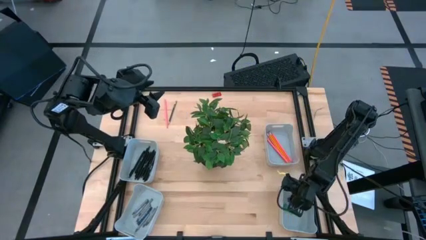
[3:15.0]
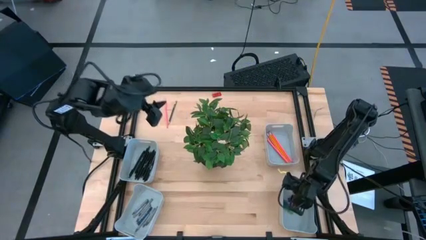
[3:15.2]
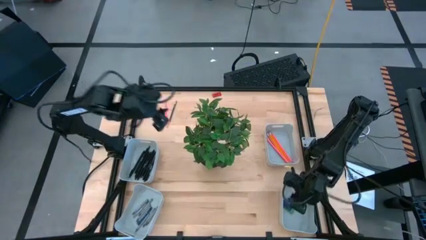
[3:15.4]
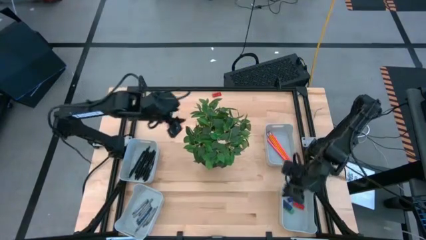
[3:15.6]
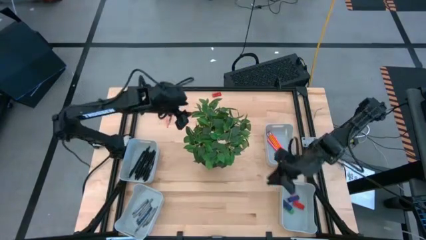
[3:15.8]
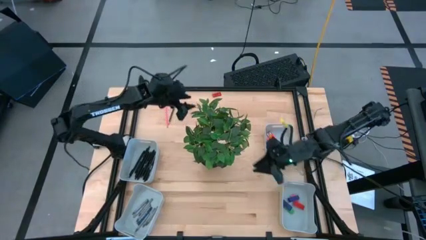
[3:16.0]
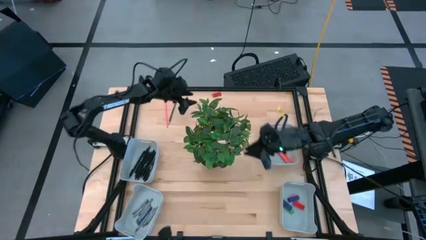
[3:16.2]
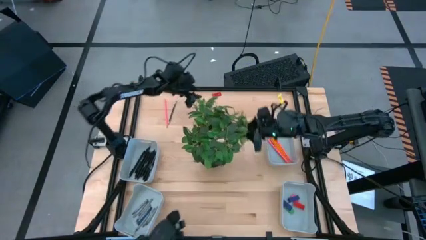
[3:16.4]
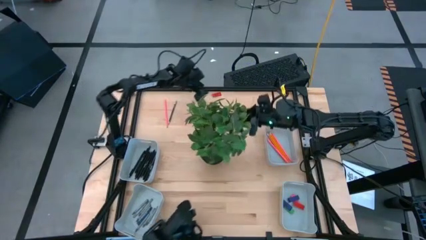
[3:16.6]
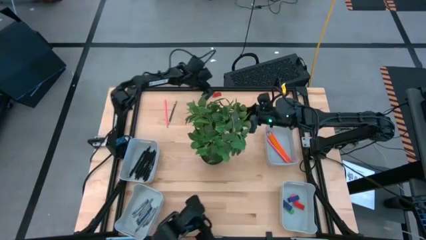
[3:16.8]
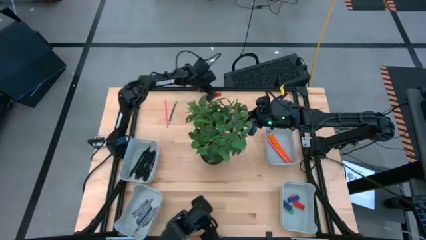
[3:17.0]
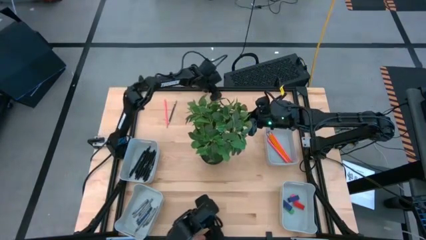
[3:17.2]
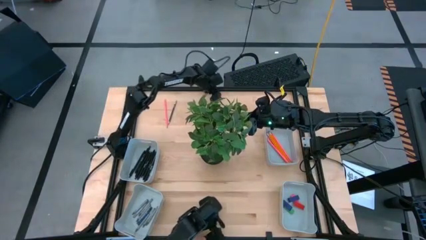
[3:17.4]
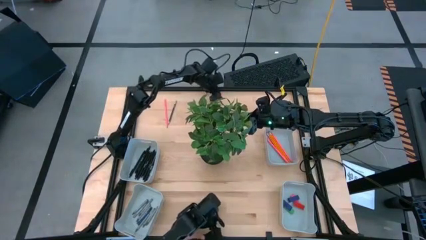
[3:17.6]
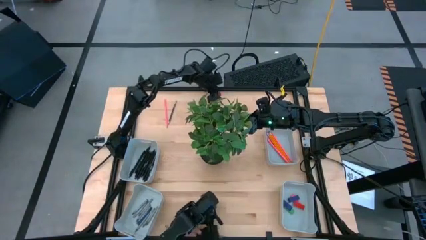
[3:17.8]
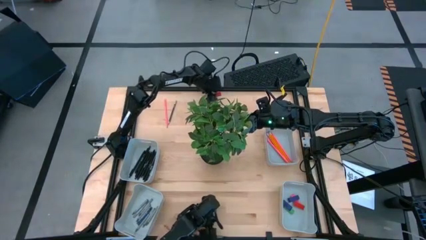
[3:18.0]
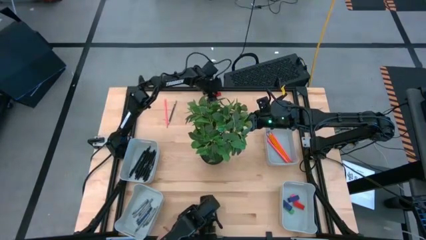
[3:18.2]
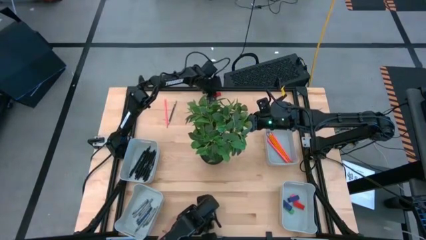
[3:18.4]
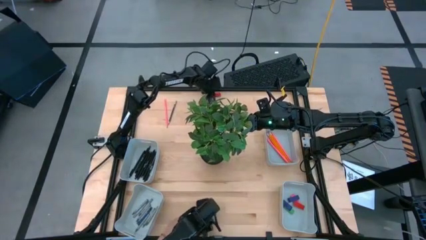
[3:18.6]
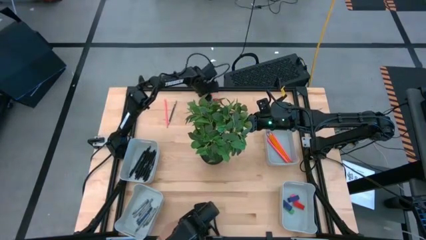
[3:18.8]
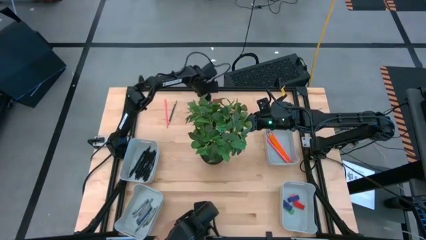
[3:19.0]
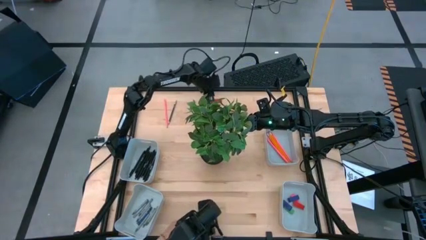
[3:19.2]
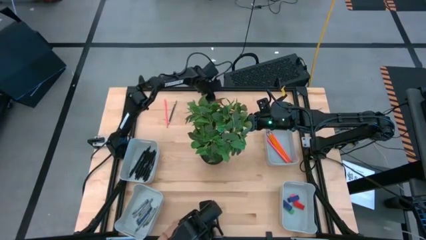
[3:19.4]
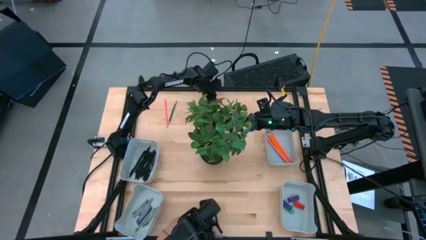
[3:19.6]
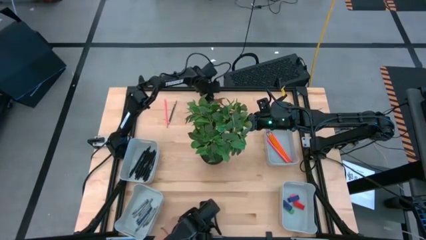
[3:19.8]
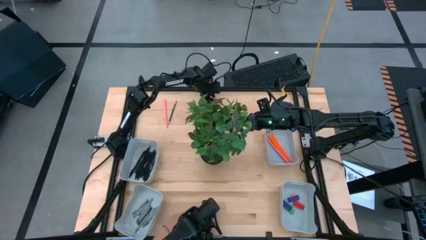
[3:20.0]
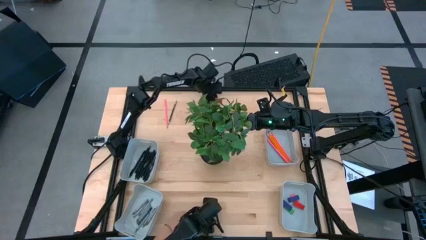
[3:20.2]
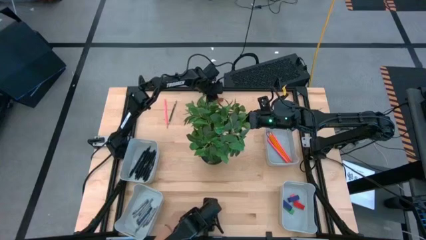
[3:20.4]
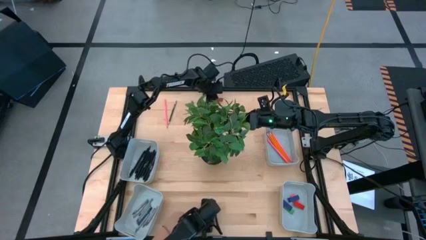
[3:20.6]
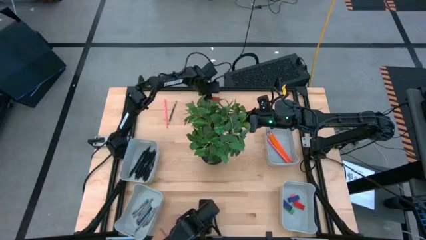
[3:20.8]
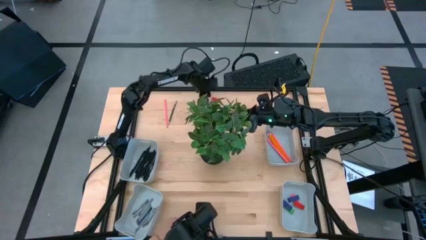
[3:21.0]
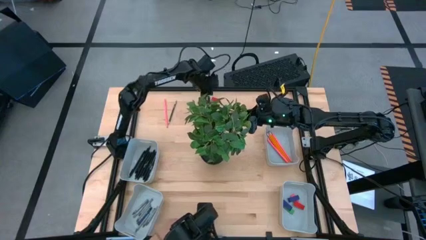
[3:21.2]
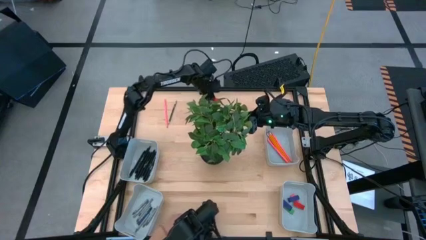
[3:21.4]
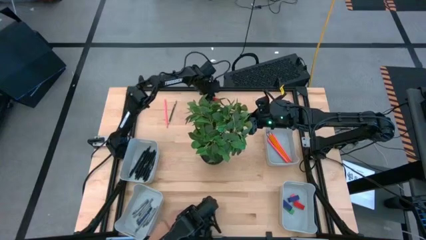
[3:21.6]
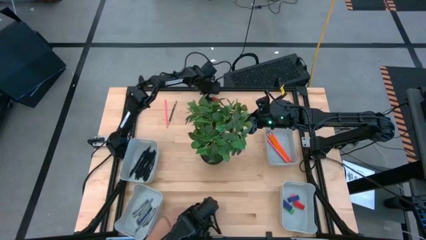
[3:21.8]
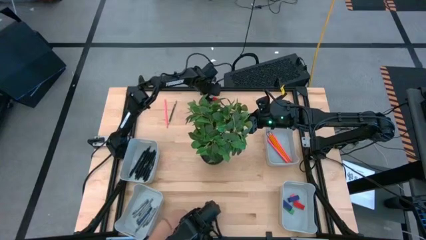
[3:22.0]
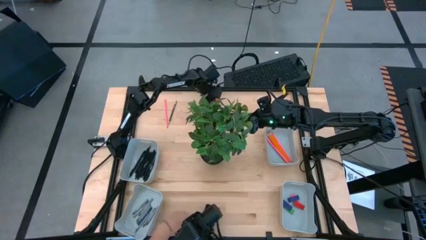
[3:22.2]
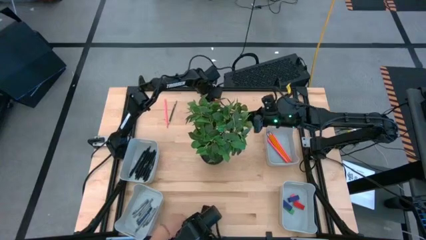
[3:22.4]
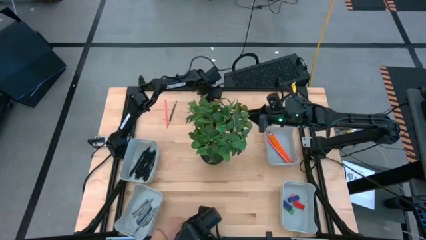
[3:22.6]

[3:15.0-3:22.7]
Task: Sort crayons/erasers/pens/pencils in bins
Put the red eraser into the bottom right gray bin

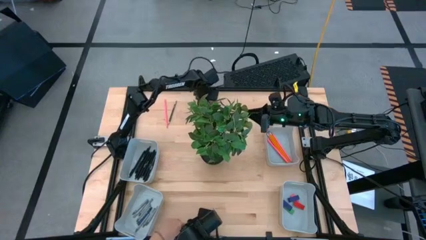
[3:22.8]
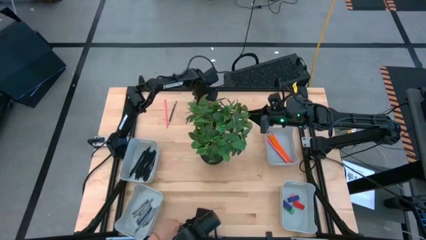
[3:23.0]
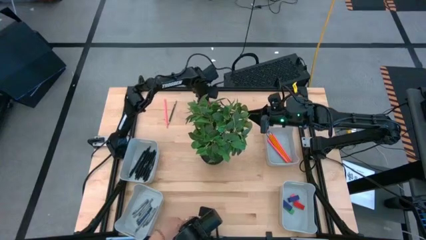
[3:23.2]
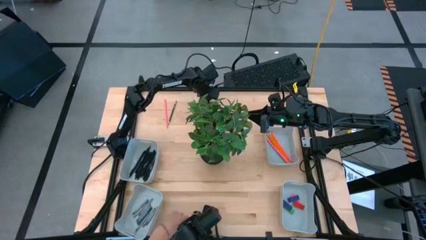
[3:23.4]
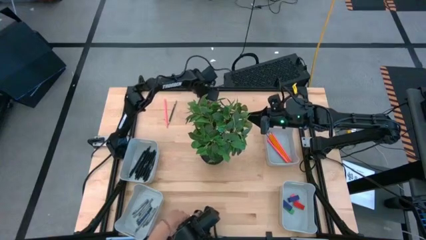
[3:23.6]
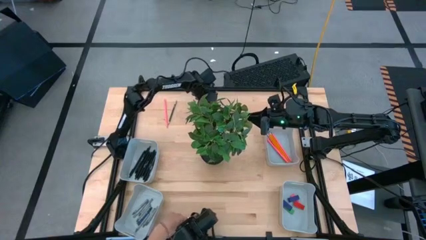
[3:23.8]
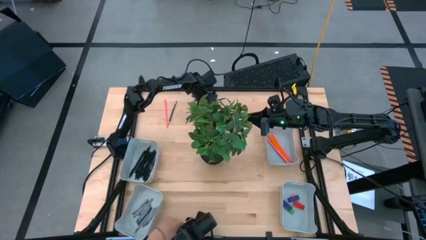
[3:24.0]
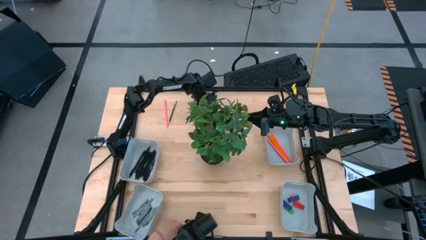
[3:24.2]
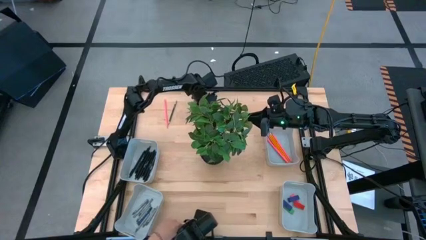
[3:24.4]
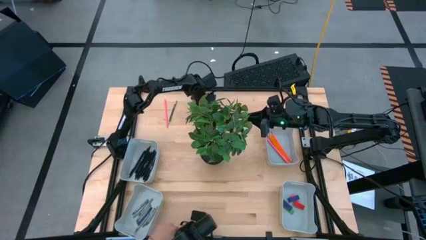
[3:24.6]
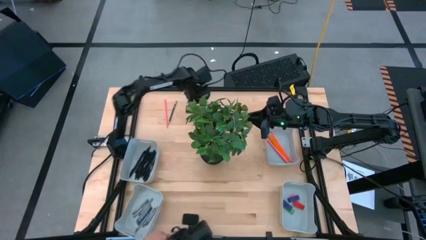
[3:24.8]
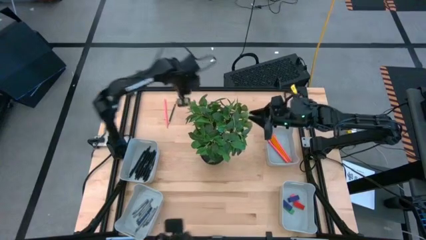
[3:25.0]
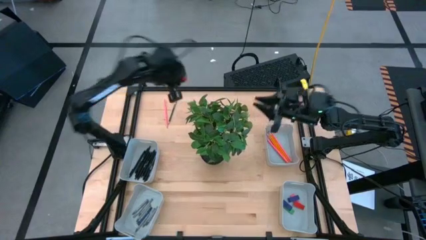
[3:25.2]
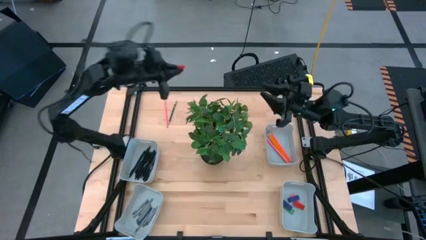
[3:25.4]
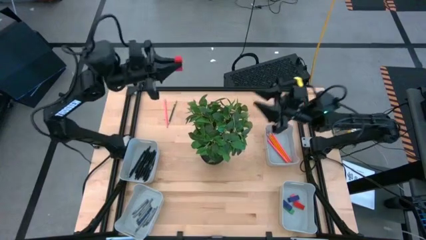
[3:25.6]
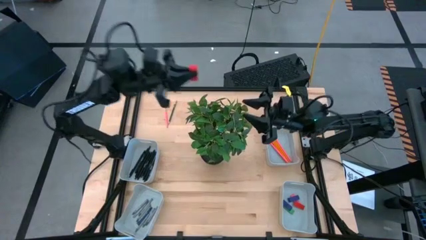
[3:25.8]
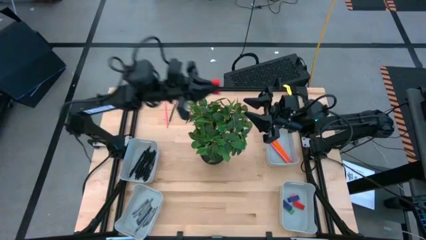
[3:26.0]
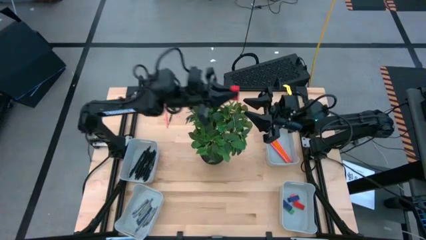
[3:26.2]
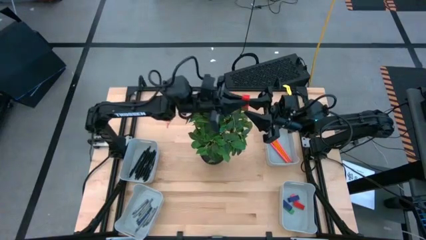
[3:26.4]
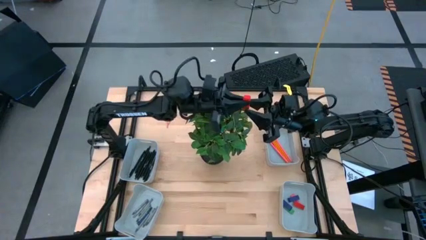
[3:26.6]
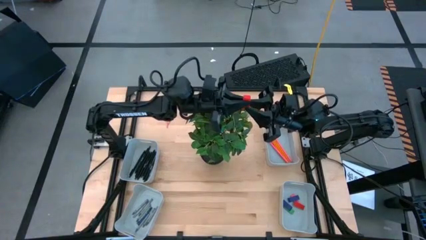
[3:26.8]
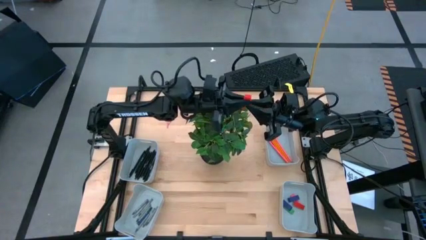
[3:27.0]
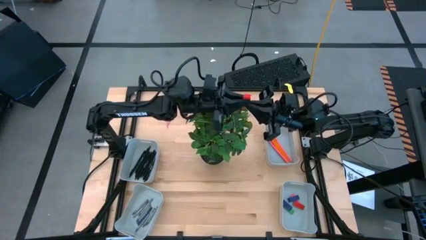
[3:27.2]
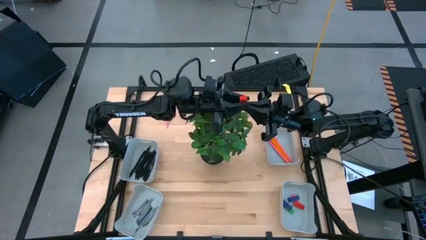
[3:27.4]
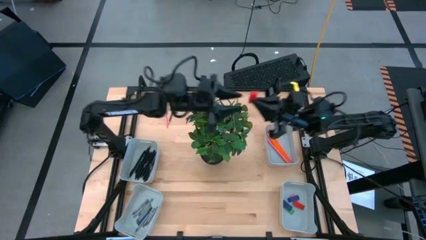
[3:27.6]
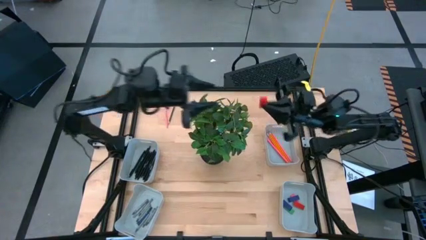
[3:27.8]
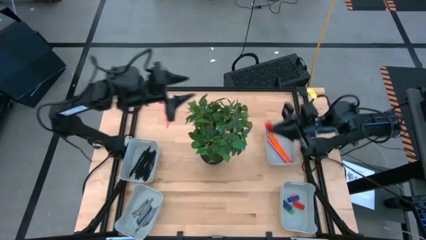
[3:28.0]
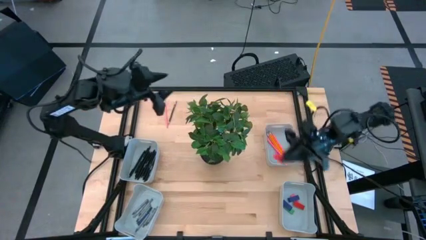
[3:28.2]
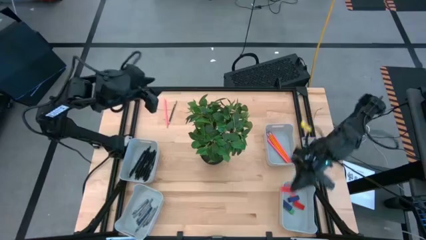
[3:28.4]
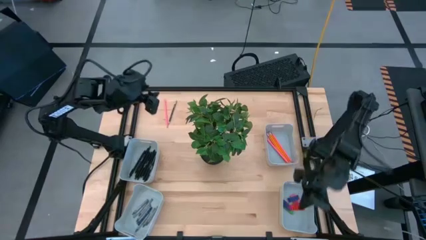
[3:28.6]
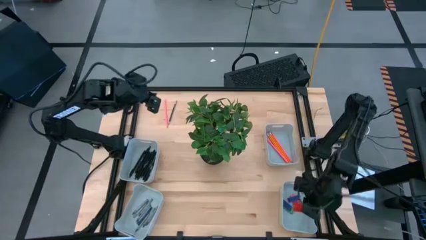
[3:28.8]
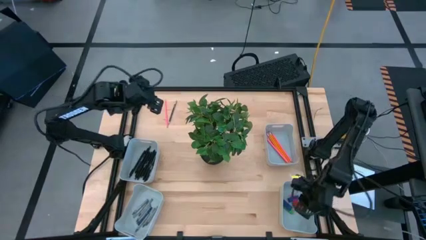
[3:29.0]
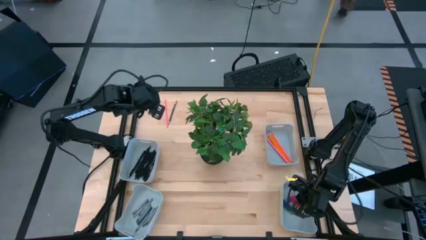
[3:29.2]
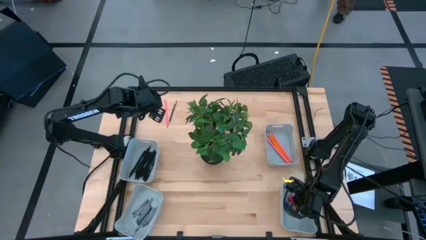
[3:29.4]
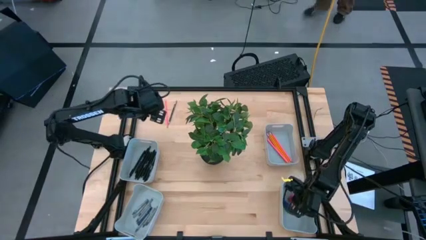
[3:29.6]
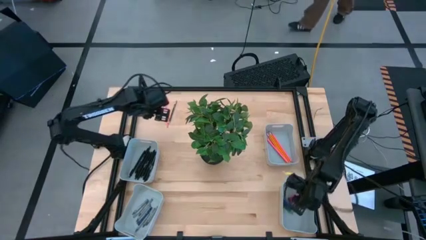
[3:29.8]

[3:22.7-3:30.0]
Put the red eraser into the bottom right gray bin

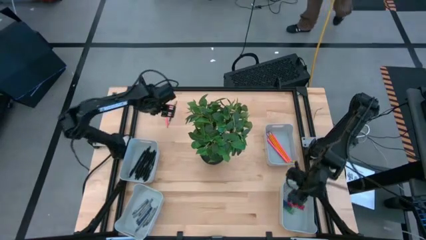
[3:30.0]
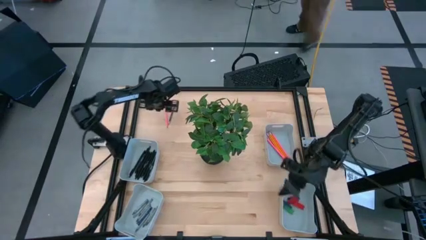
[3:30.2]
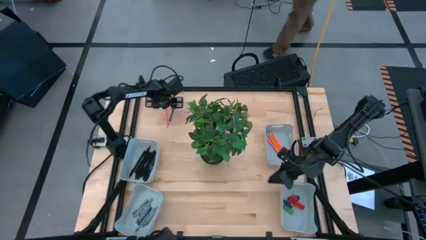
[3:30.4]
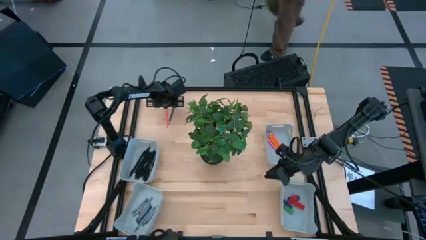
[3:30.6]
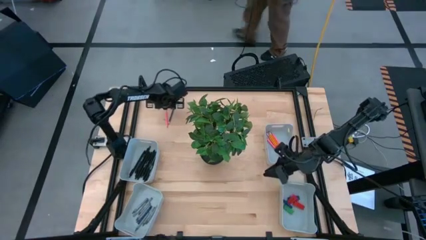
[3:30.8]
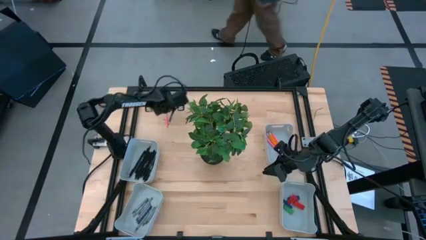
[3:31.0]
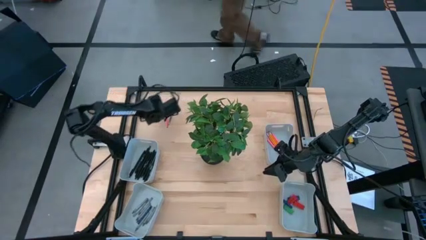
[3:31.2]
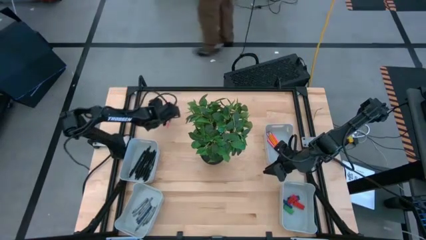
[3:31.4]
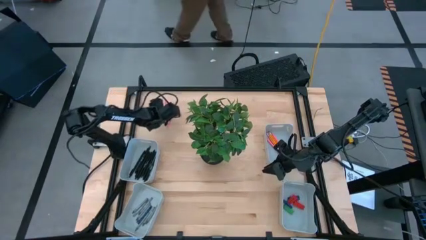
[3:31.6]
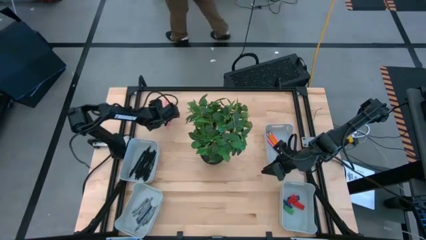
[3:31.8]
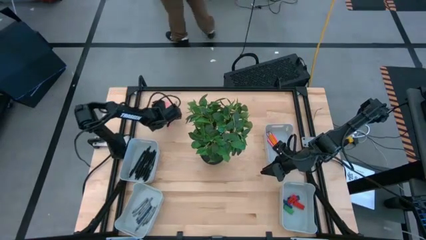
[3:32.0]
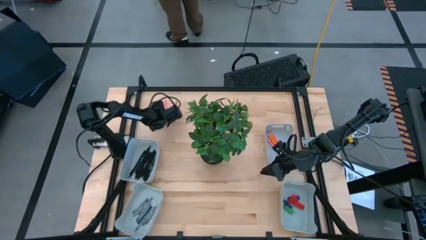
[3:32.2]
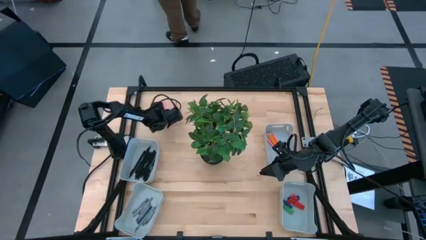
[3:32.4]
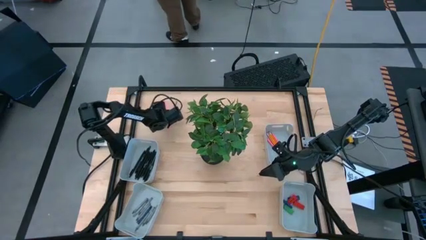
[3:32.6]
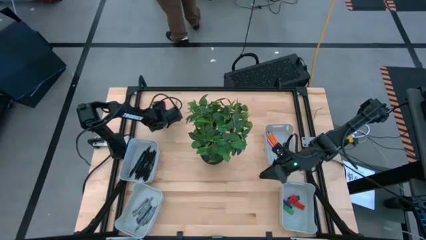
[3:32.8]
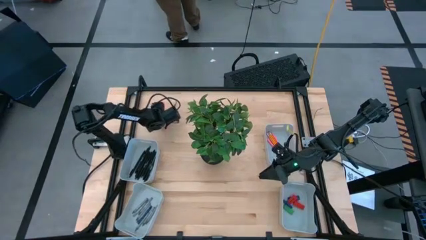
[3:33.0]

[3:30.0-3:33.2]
Put the pink pencil into the top right gray bin
